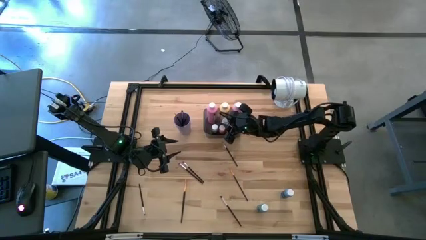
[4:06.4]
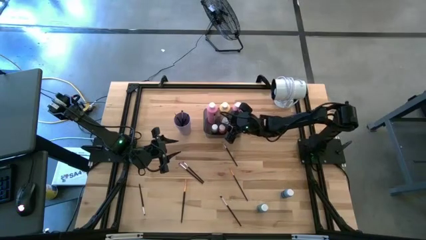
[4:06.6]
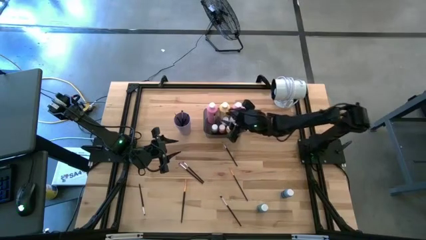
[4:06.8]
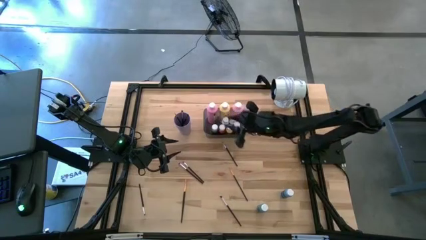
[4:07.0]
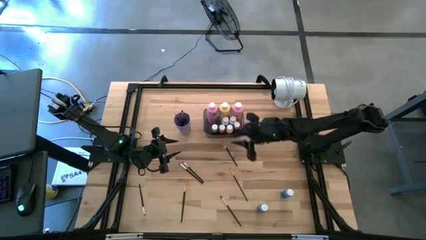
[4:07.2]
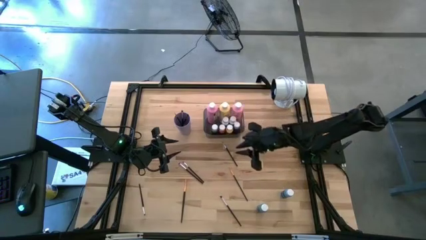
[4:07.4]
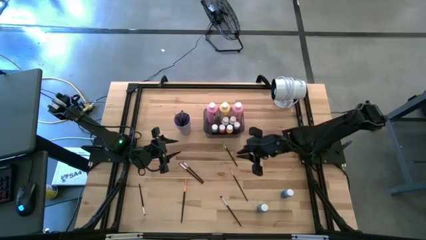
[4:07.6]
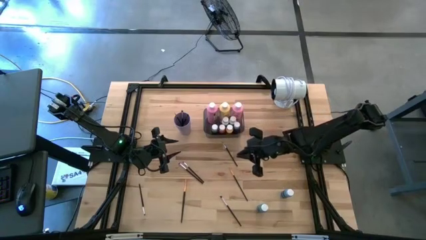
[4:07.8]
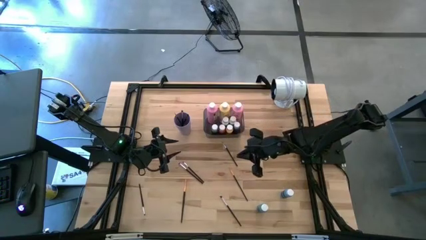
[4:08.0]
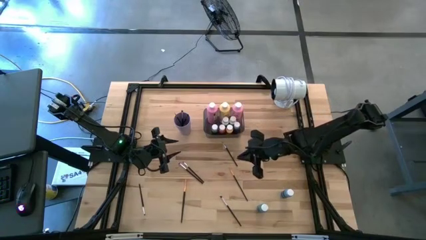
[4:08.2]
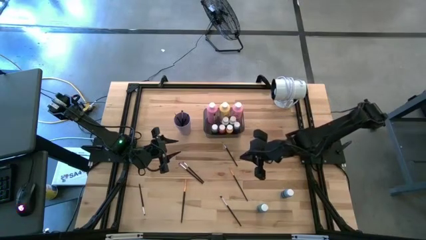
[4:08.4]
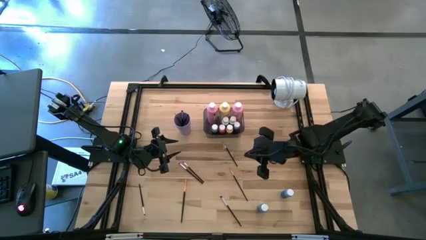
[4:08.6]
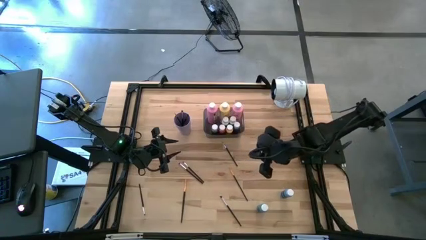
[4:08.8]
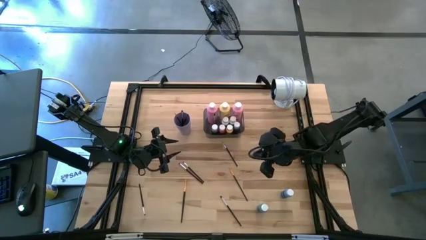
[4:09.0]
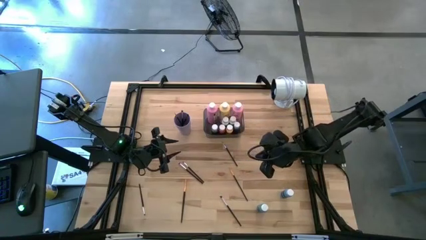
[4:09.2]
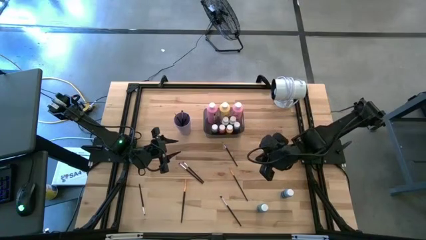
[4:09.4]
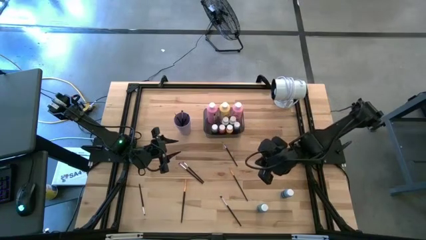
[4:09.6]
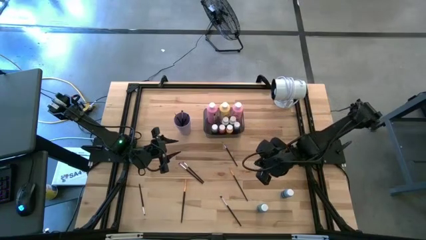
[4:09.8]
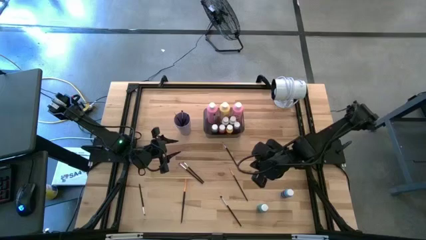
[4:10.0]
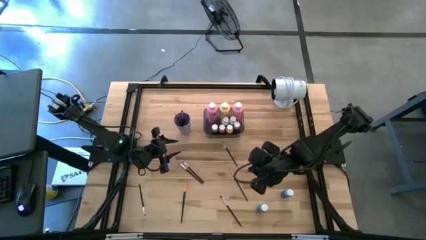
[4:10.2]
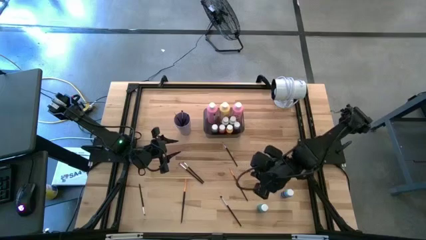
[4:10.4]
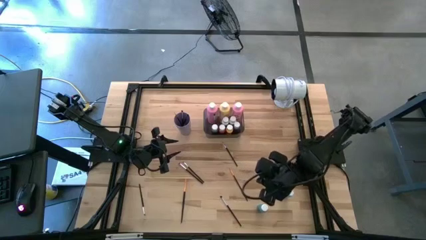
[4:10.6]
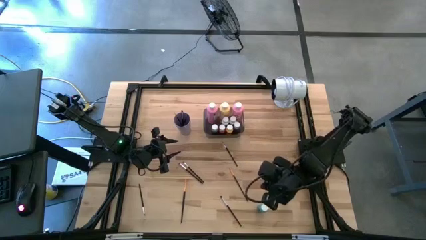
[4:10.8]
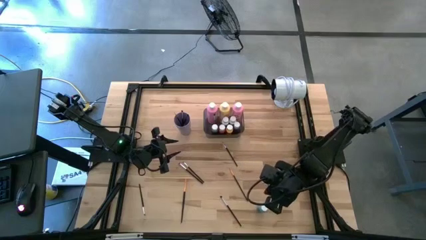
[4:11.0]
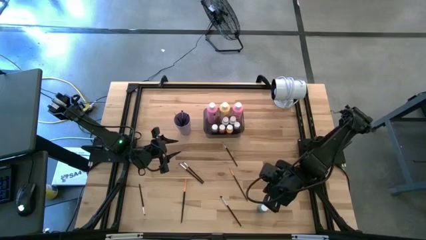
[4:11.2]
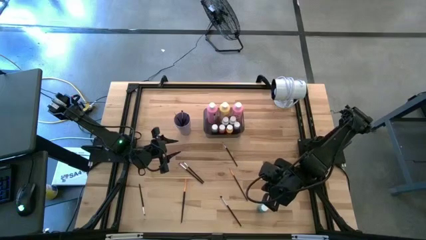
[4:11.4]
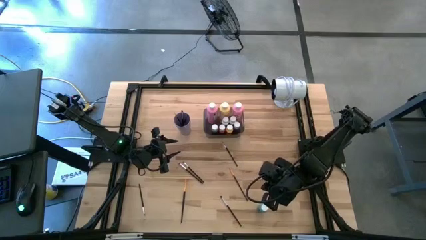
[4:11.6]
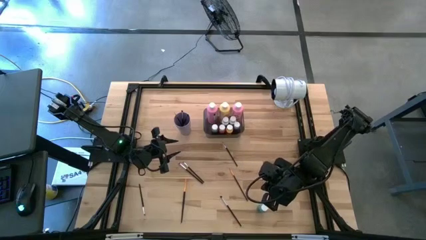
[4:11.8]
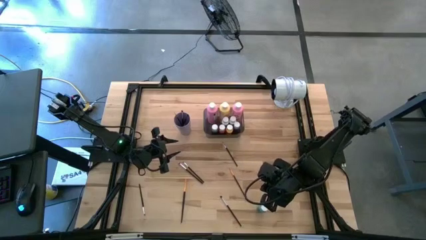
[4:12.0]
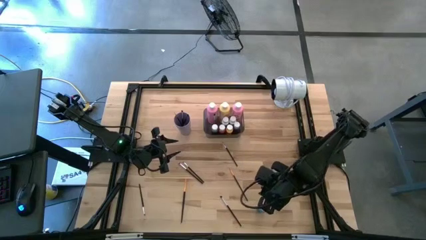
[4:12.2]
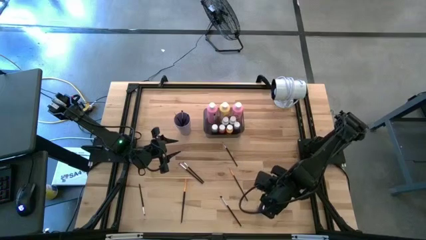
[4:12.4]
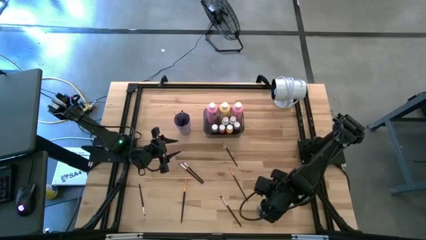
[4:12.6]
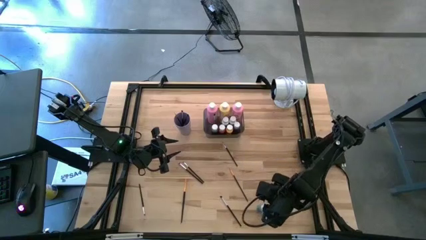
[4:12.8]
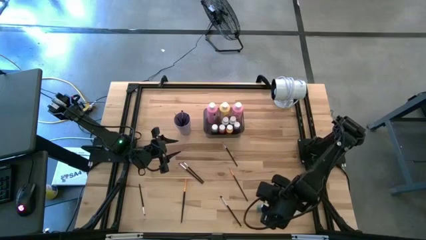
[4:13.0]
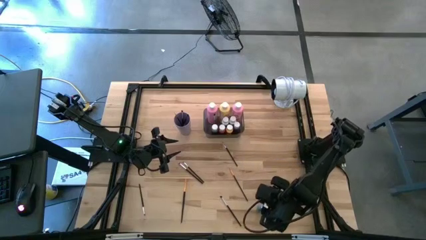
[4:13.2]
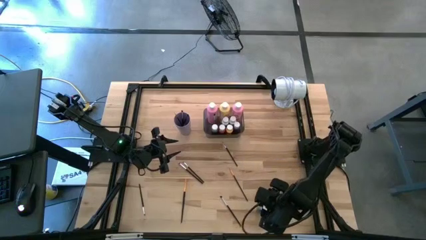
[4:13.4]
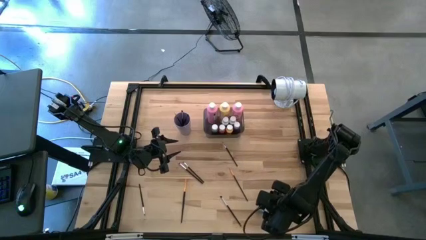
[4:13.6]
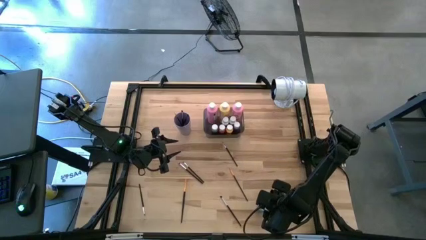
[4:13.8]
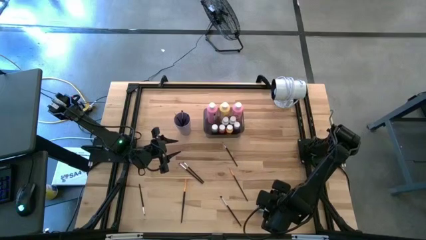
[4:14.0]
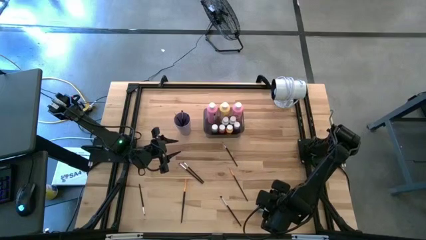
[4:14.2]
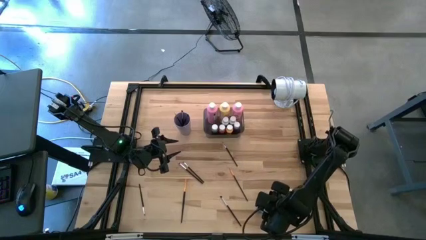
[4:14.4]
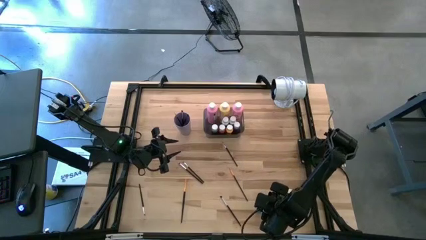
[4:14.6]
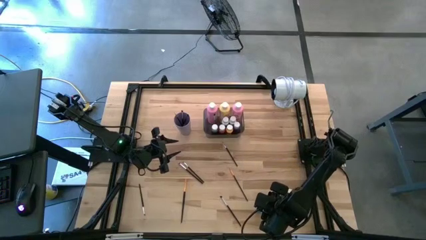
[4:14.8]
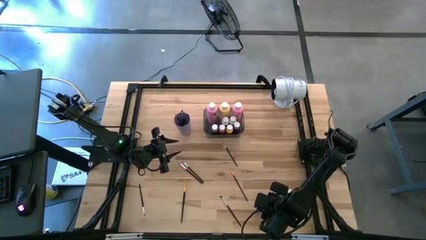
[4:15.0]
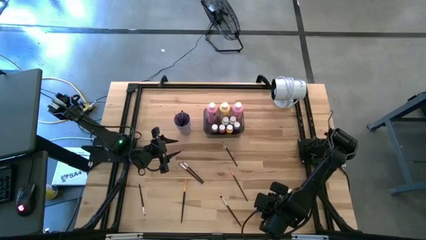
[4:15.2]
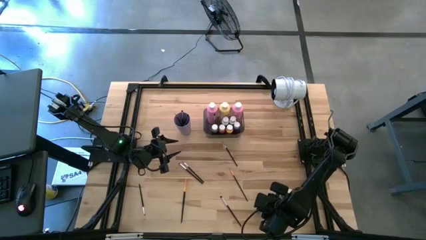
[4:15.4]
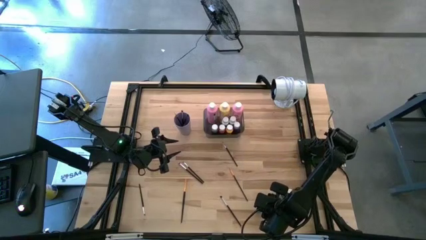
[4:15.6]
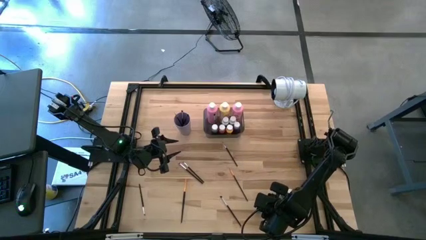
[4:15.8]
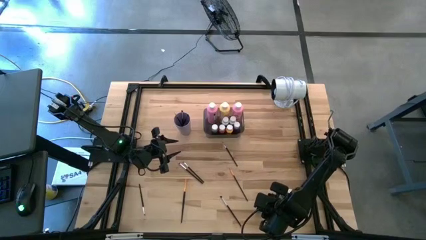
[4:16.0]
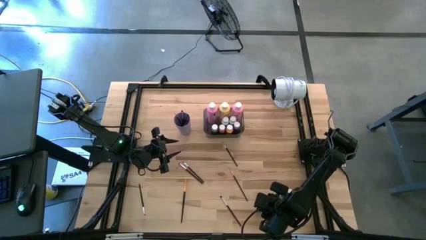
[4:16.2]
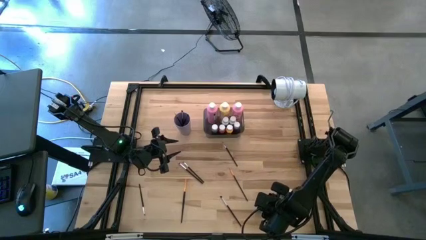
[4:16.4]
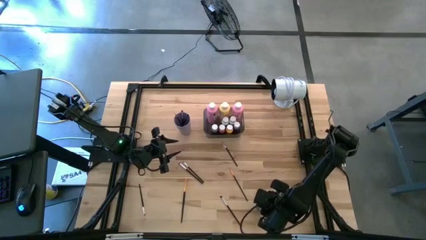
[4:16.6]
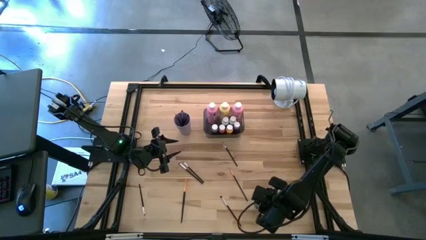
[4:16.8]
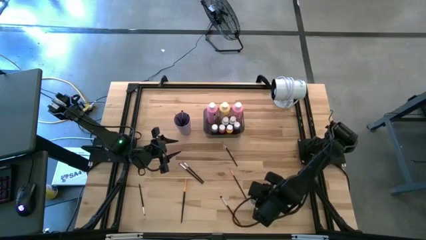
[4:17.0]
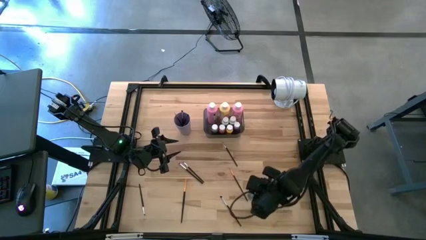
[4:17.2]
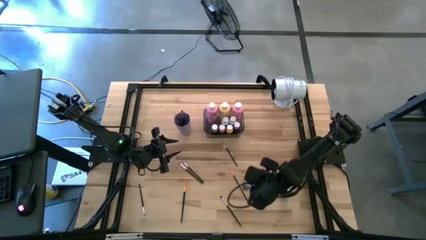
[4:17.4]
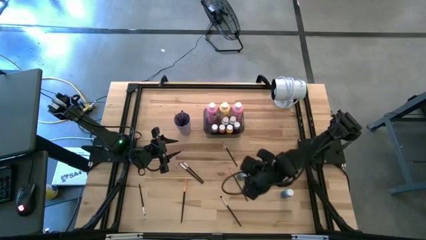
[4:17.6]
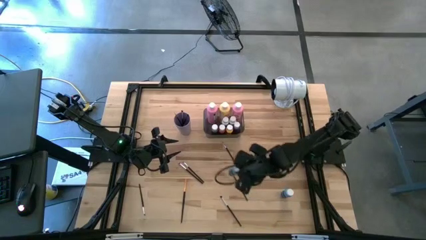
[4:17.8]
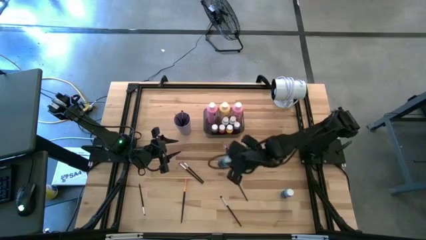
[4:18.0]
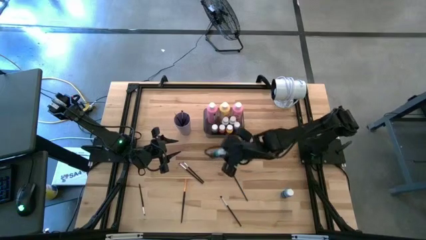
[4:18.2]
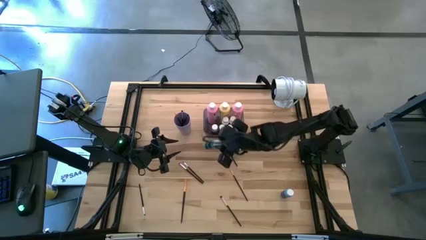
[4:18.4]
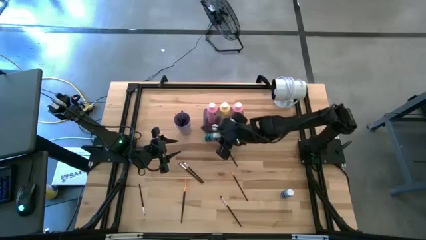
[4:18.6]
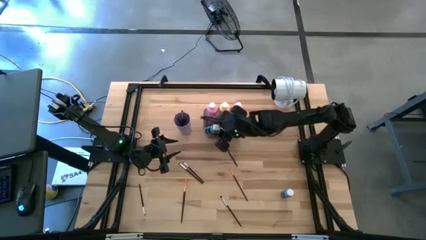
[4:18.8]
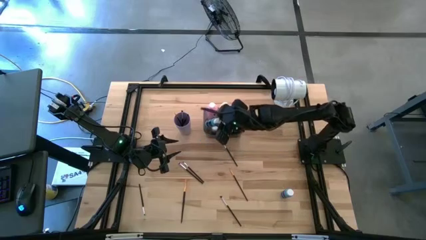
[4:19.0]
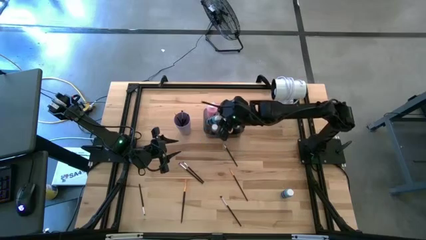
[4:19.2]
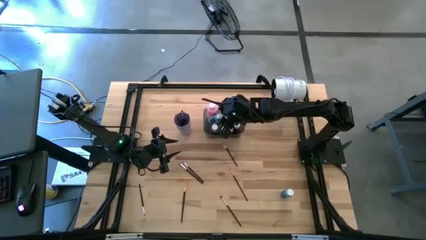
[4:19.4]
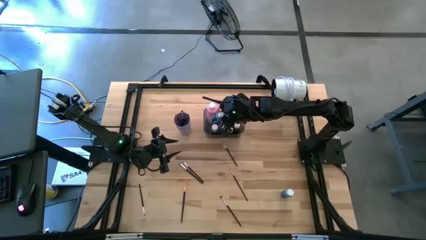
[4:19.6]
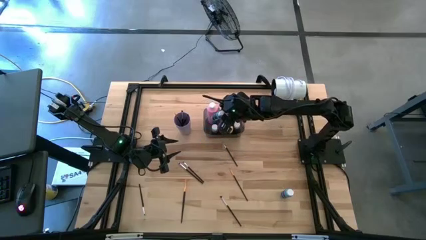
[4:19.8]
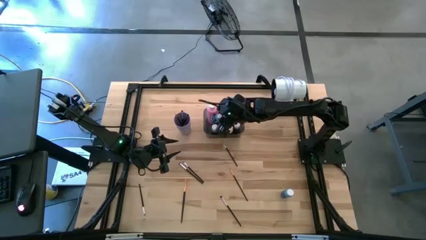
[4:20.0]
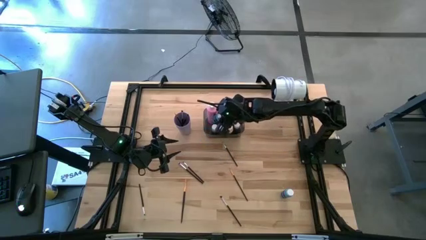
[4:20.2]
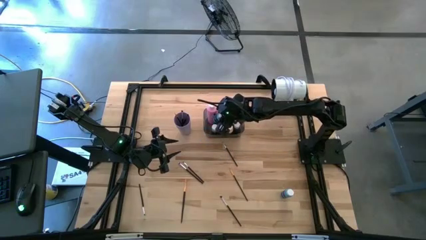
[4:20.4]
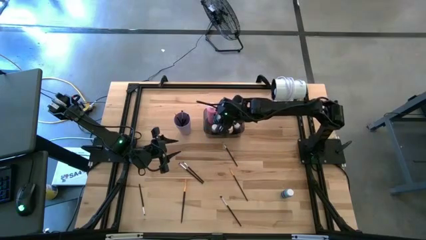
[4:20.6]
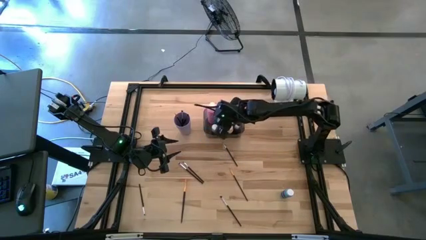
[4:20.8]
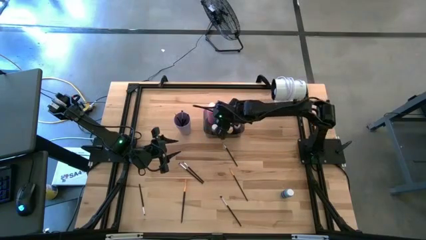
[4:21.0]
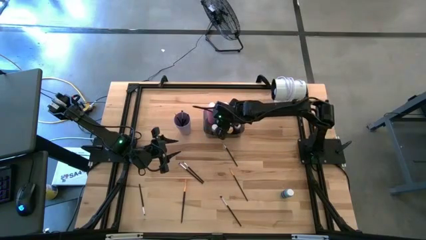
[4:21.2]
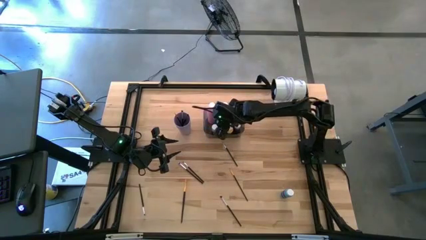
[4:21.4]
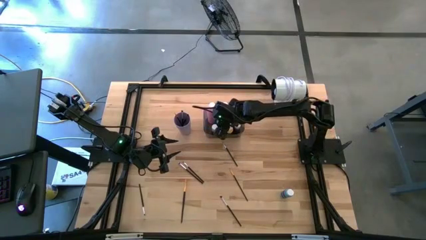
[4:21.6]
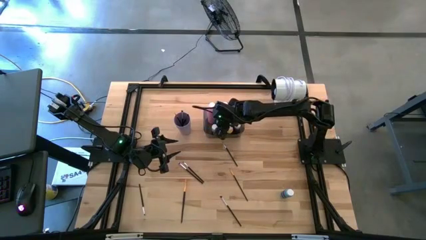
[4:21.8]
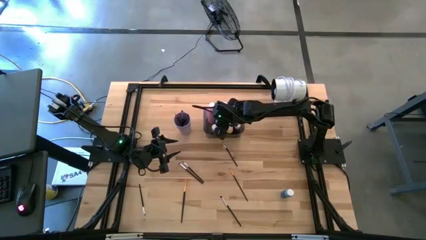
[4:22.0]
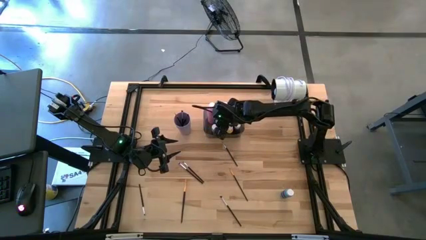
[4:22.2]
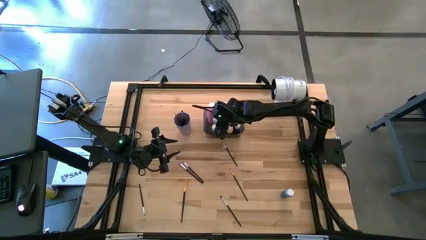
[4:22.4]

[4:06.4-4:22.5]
Task: Pick & Place Paint Supplies
Put the small blue paint bottle into the gray bin

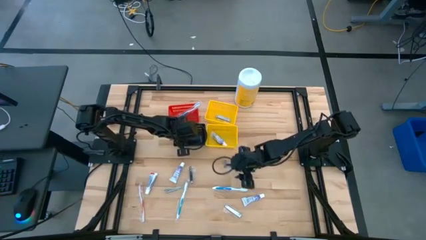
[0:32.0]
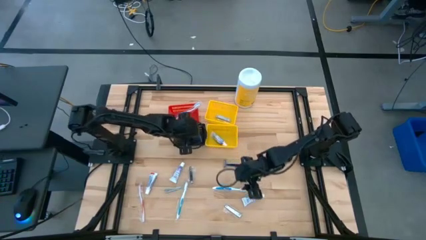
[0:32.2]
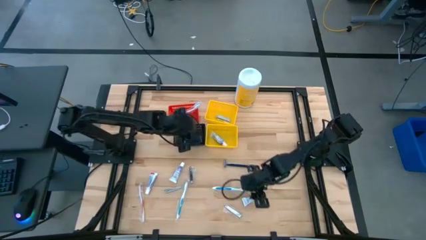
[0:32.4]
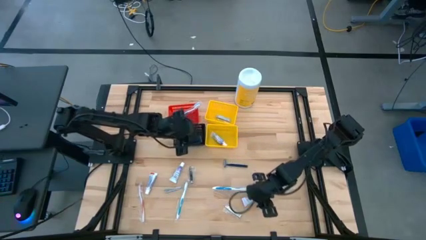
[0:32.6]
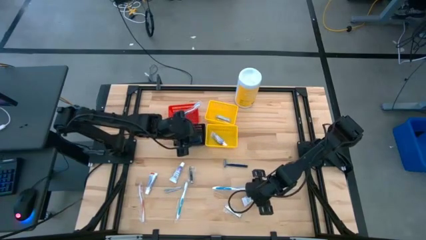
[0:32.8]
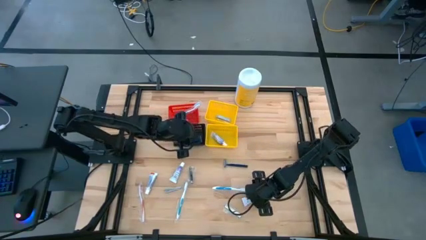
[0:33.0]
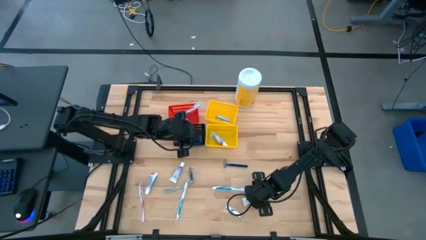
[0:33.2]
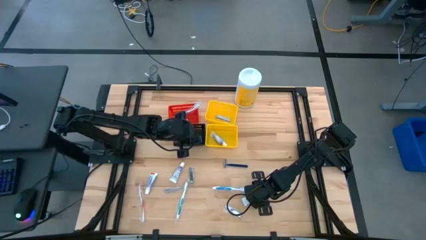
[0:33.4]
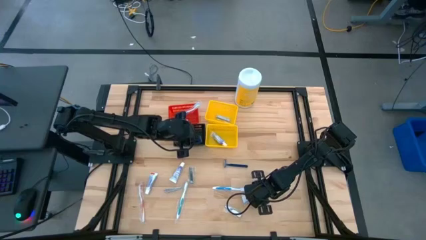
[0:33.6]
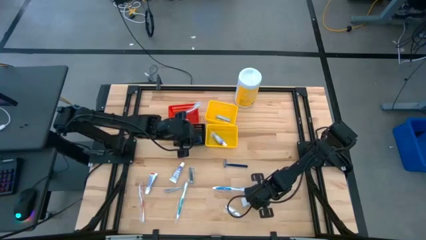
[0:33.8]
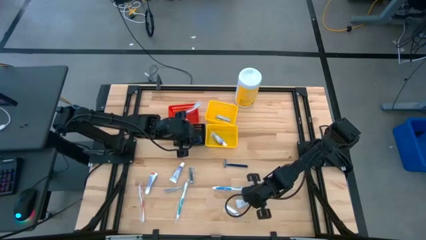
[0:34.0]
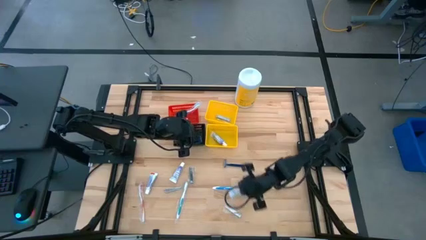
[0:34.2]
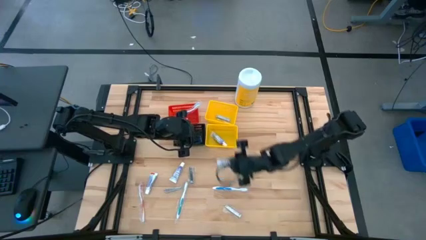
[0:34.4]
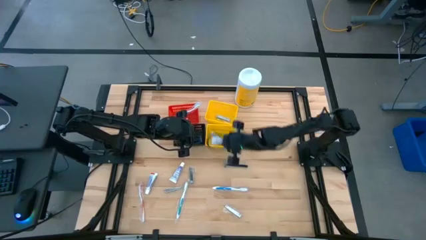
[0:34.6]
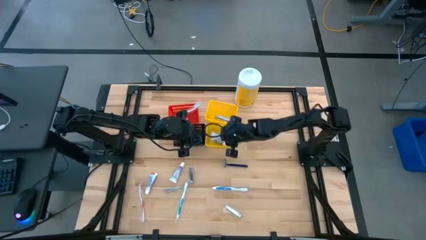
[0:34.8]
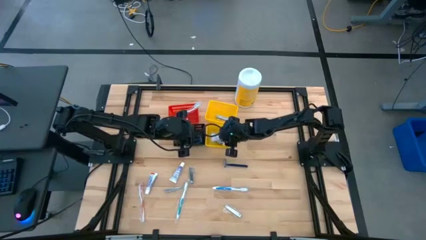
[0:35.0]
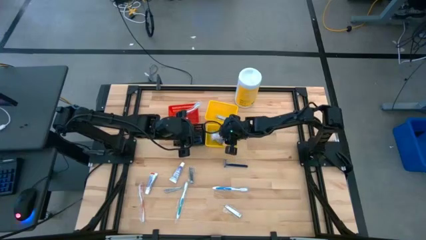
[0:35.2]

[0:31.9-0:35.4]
Task: Pick & Place Travel size toiletries
Put the white toothpaste into the bottom yellow bin
